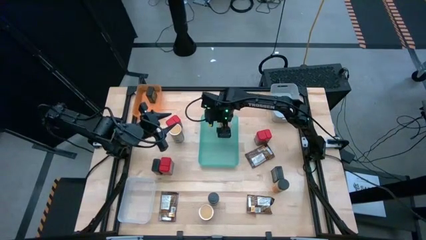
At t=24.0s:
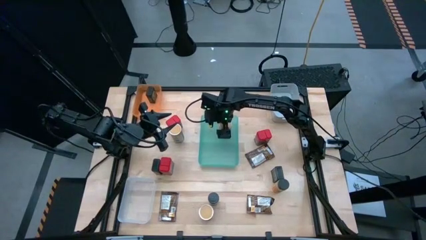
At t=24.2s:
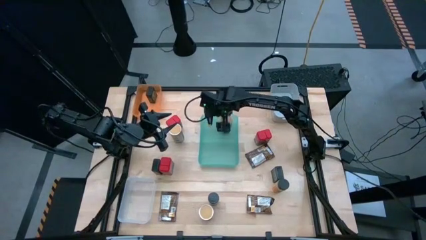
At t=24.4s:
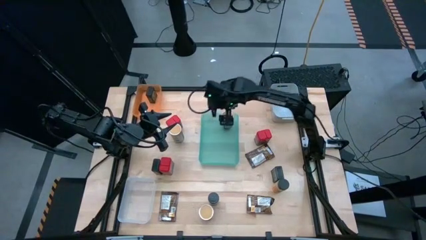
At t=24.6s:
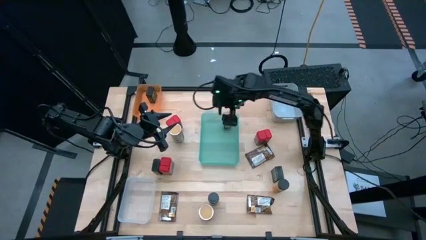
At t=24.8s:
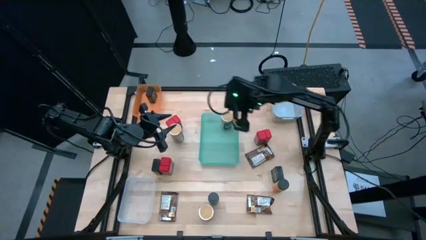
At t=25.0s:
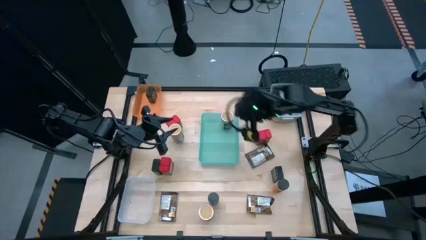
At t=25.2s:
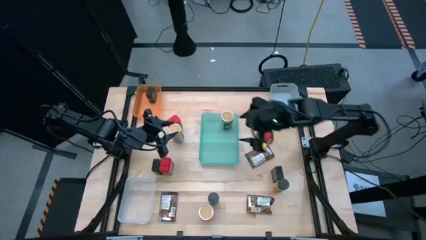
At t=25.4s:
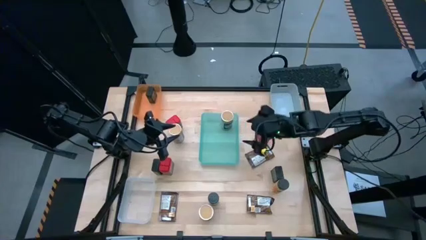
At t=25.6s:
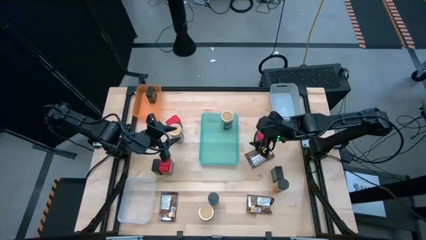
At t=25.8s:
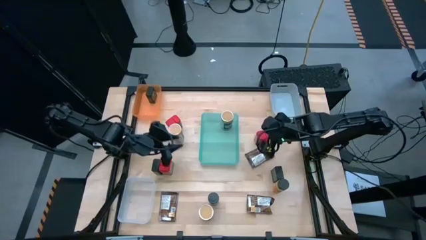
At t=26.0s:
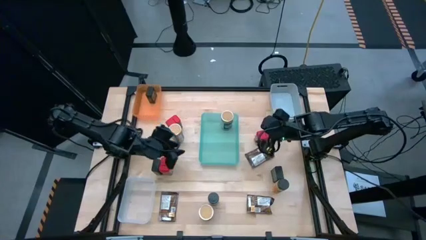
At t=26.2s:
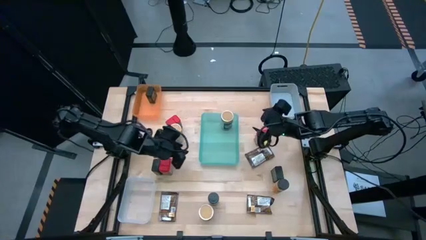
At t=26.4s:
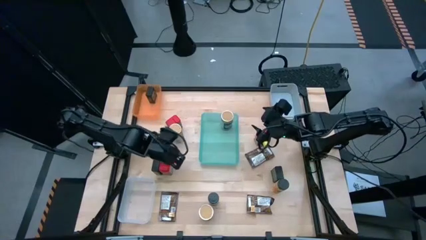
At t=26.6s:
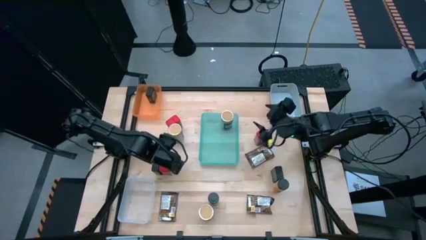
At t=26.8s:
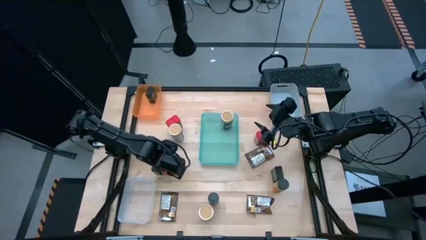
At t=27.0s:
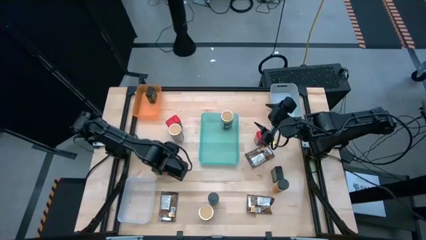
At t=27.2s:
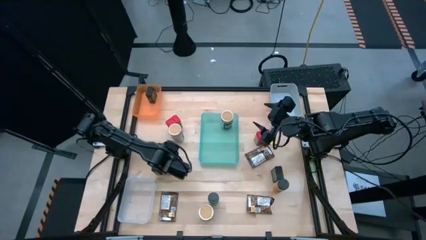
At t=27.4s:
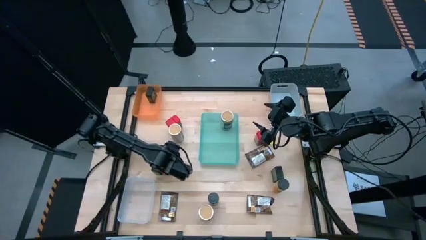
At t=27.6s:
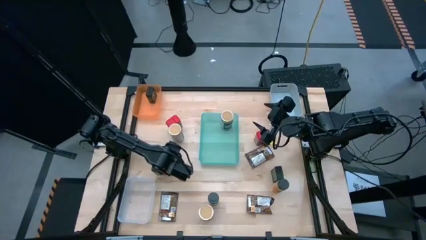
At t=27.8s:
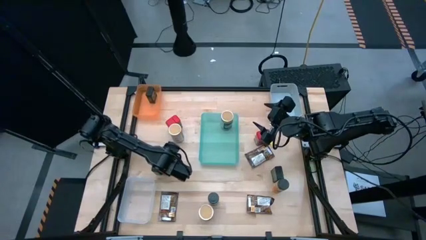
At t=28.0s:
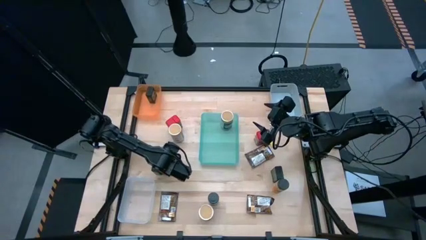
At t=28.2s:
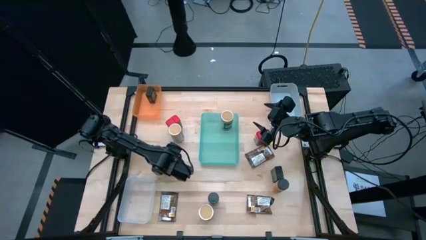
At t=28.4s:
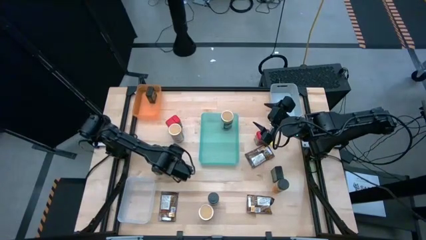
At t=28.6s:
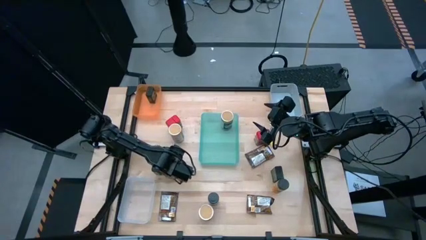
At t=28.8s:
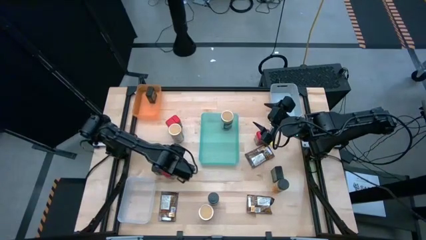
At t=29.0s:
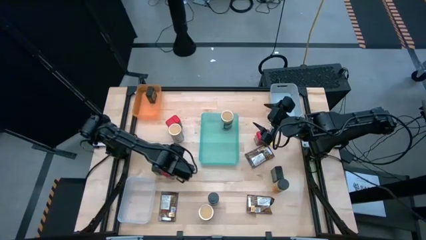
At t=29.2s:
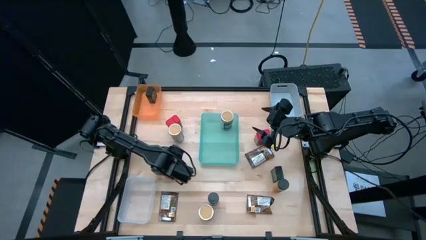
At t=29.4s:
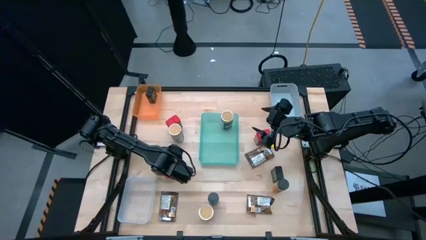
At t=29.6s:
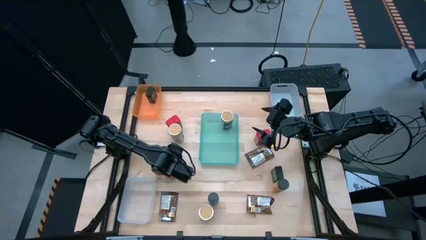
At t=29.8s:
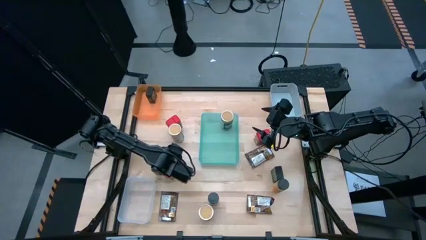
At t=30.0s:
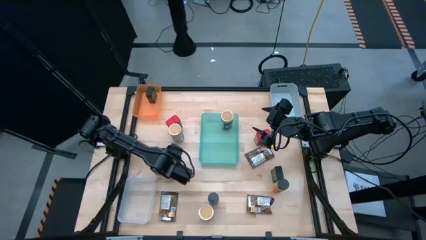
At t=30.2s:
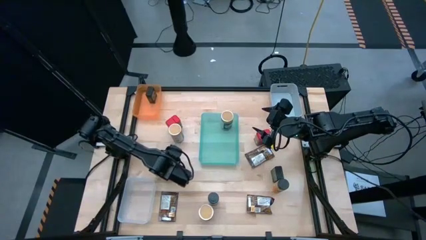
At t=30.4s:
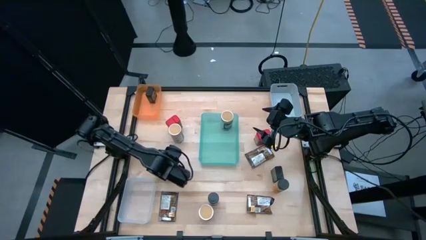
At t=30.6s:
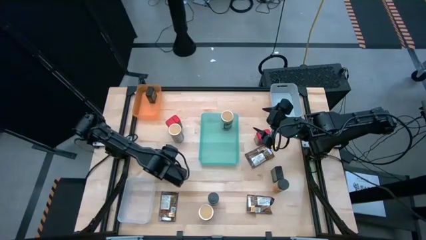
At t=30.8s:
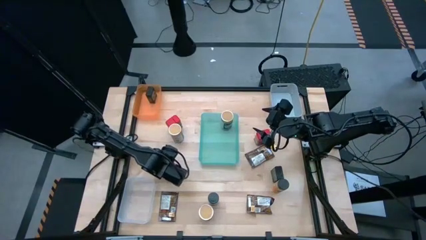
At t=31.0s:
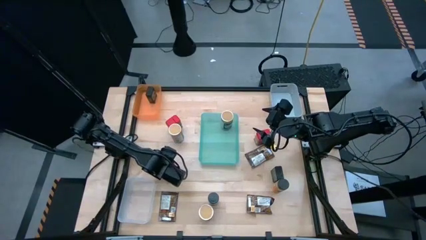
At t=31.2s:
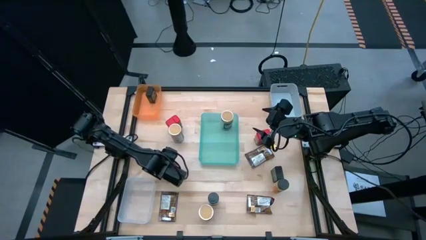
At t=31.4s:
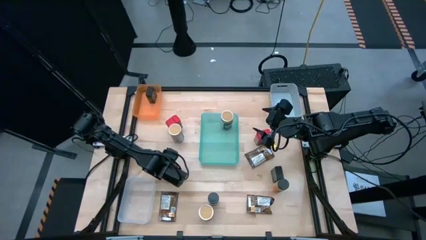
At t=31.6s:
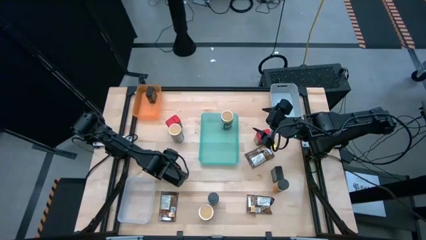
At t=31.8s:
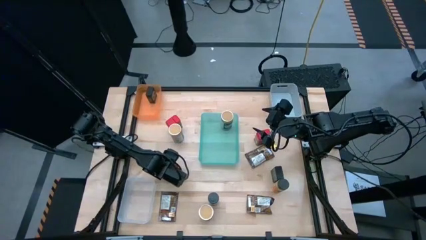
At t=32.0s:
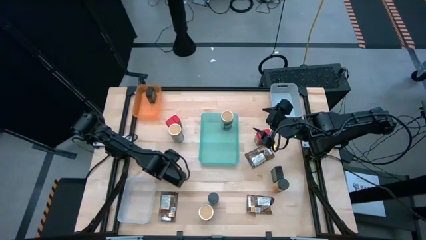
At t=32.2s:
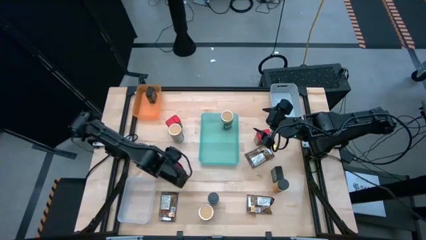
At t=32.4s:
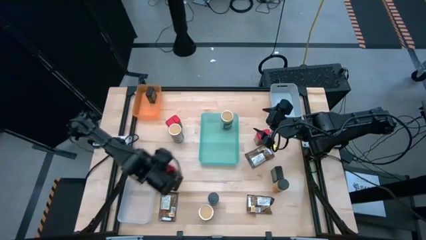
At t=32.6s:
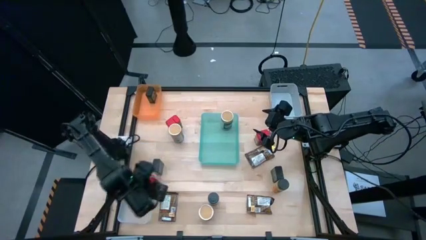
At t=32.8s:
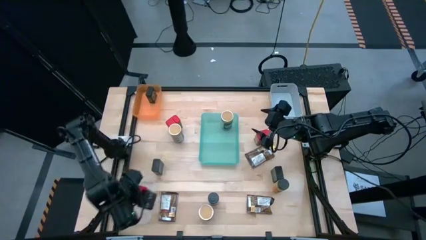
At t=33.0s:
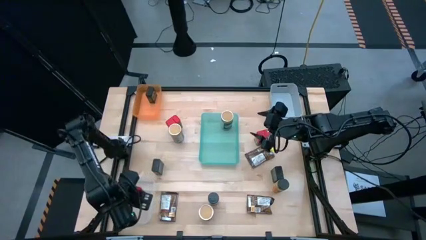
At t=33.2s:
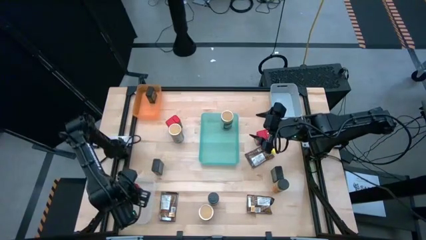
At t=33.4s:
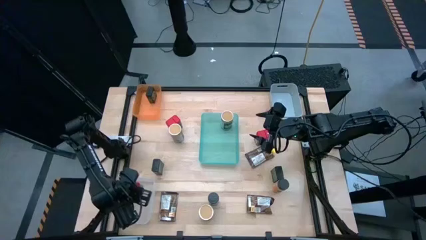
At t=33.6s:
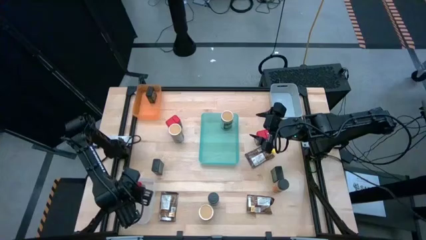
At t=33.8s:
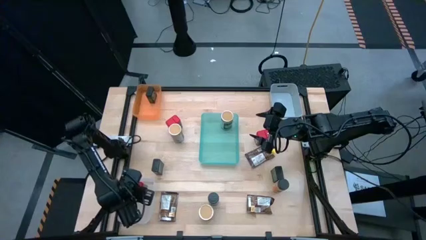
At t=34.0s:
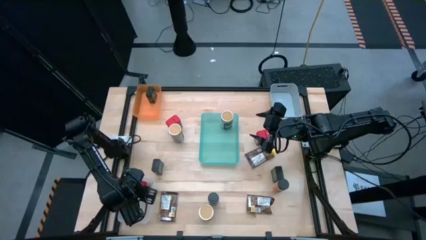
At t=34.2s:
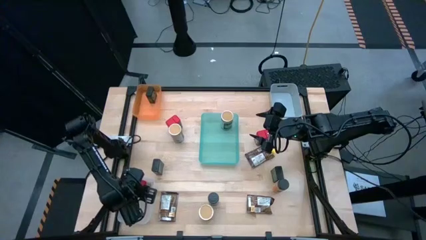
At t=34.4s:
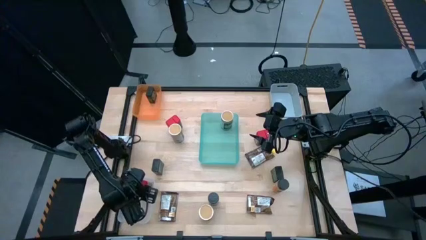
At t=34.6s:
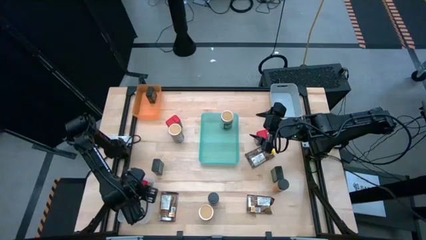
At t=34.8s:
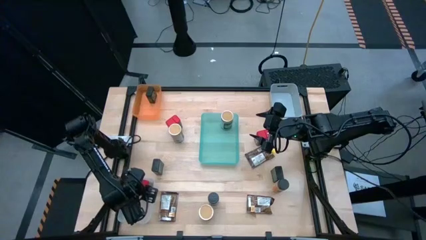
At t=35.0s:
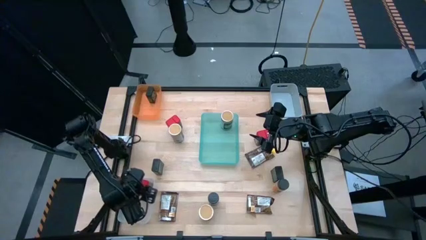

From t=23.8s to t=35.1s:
Task: Sort spices by type
Put the bottom red seasoning can into the transparent bin

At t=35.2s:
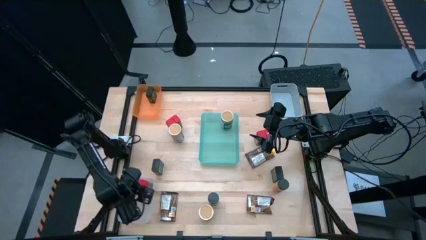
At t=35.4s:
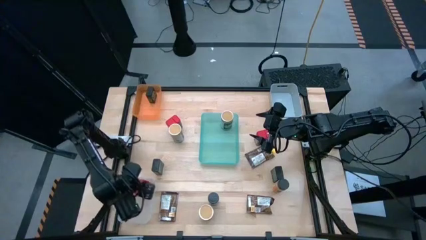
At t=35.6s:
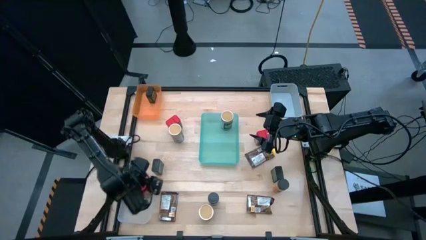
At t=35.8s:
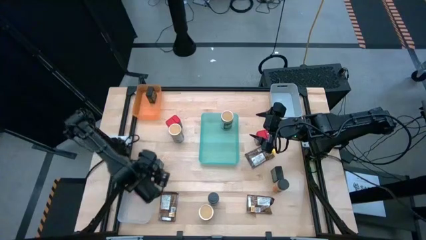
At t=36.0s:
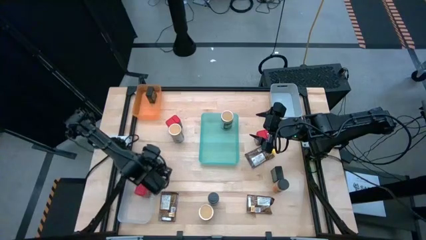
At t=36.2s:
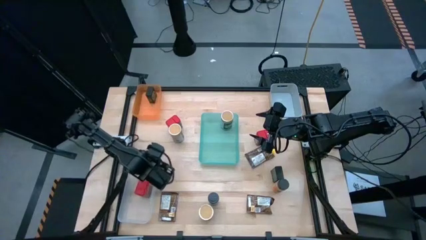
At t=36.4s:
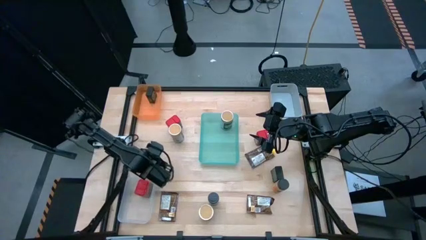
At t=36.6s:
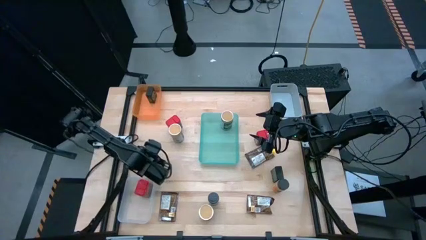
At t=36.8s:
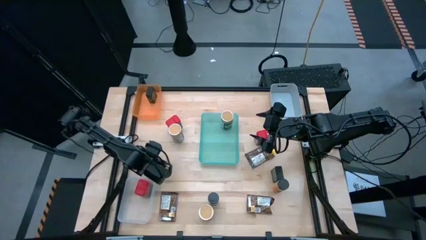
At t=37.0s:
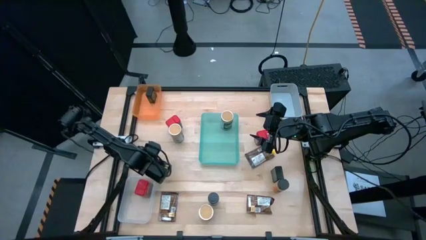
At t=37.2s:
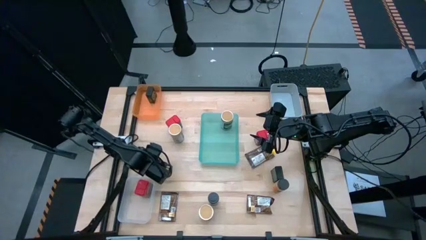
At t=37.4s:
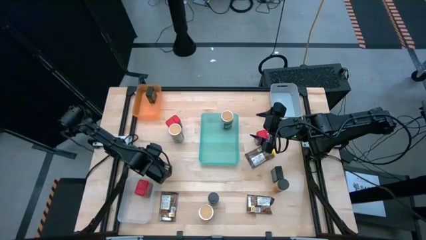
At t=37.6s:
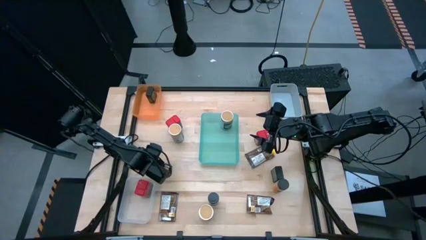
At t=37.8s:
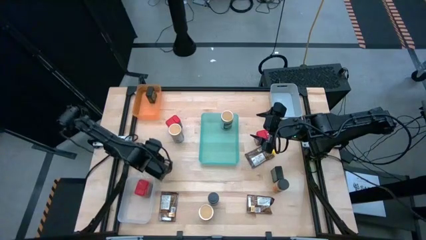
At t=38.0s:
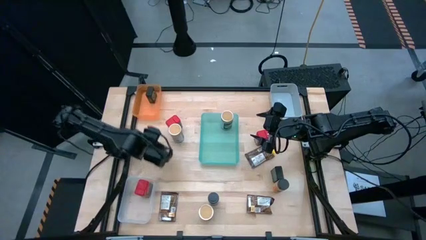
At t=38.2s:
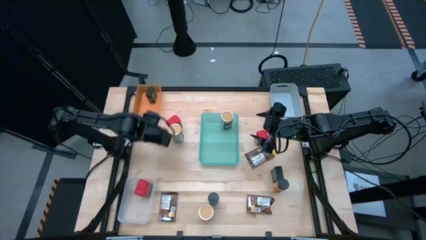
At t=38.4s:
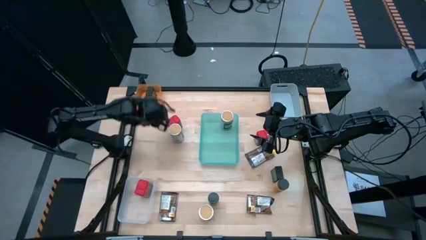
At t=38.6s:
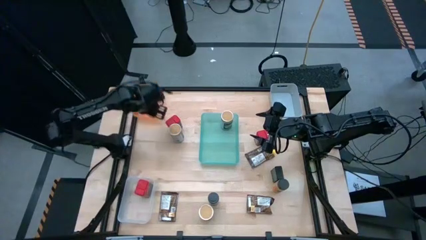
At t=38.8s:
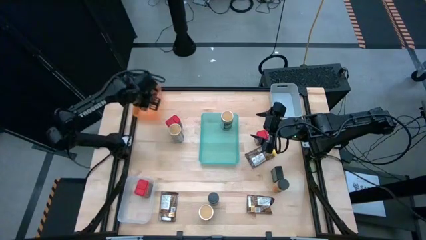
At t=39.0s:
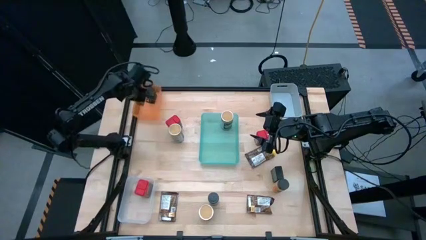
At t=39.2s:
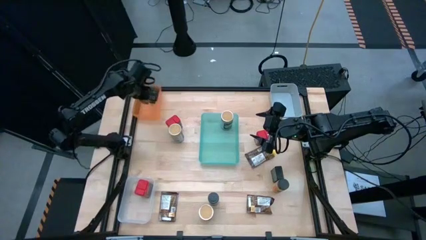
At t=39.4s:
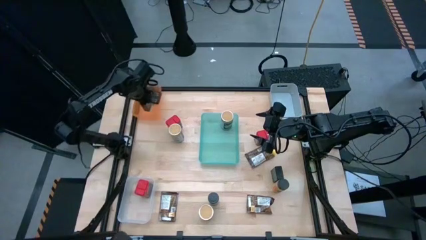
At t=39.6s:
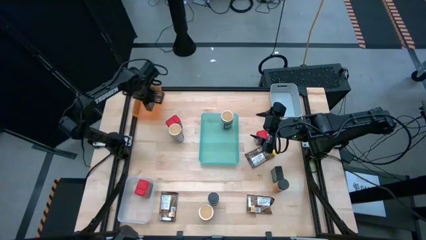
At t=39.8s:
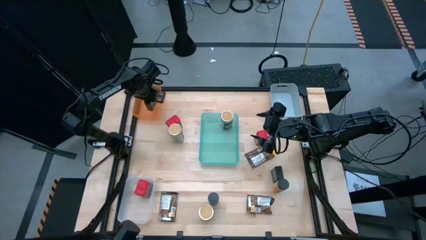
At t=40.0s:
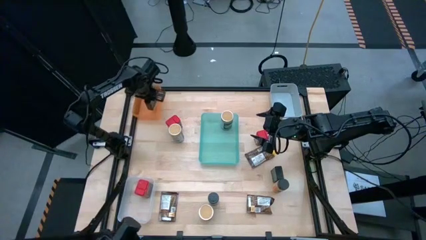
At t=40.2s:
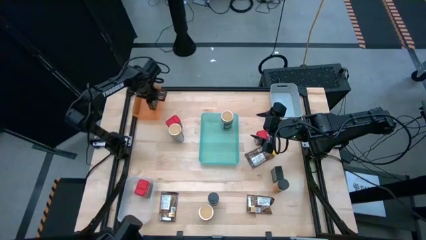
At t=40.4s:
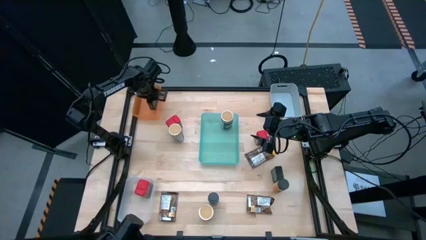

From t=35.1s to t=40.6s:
Put the left black seasoning can into the orange bin
